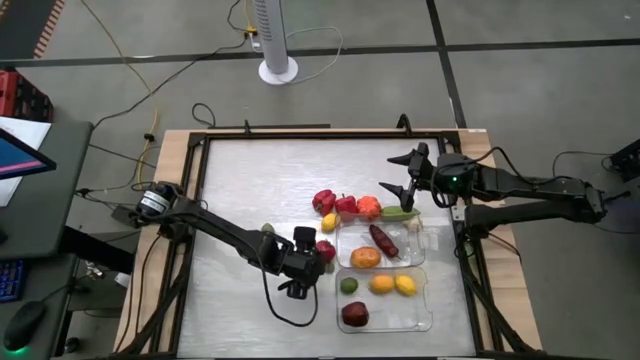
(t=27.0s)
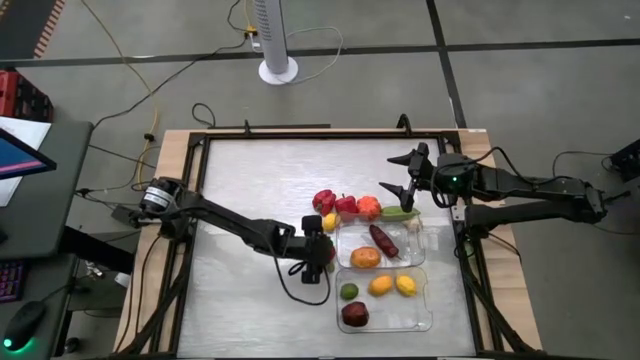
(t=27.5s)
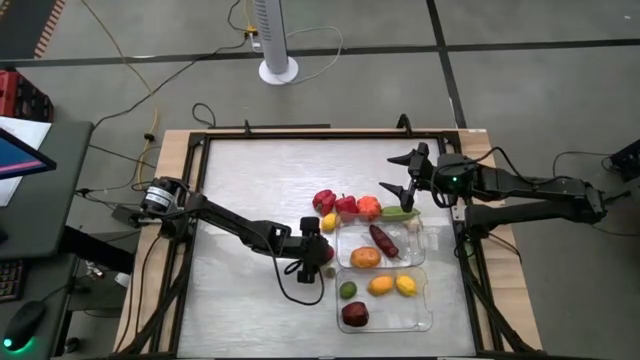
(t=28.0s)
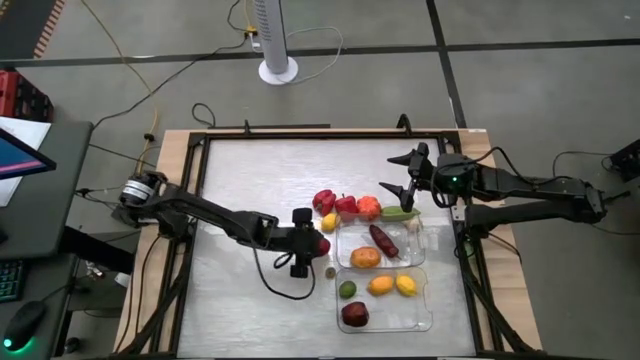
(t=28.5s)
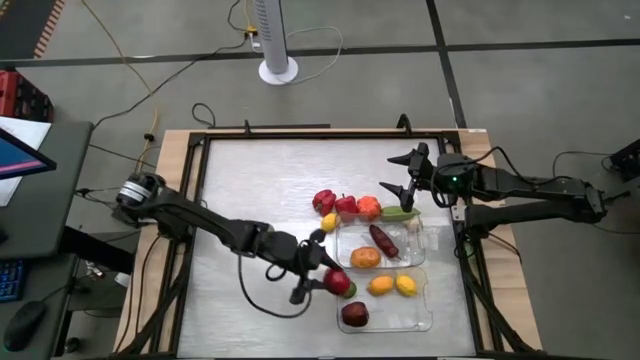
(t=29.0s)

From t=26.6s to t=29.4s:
Task: Sort produce into baskets
Put the tomato into the bottom transparent bin

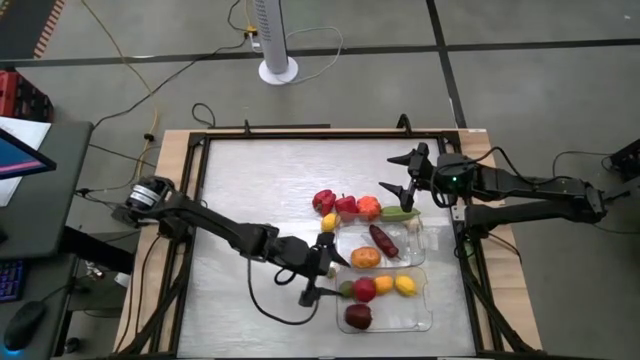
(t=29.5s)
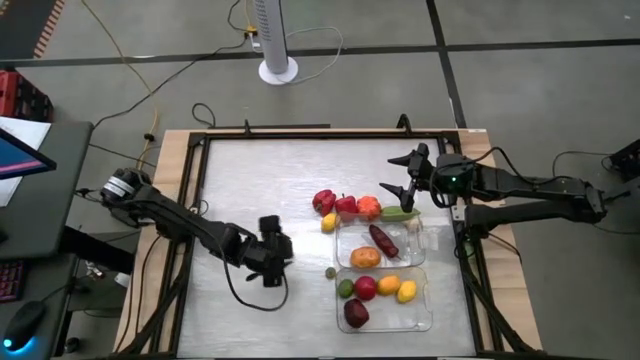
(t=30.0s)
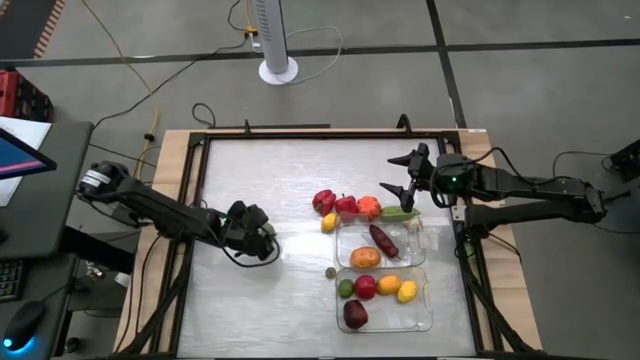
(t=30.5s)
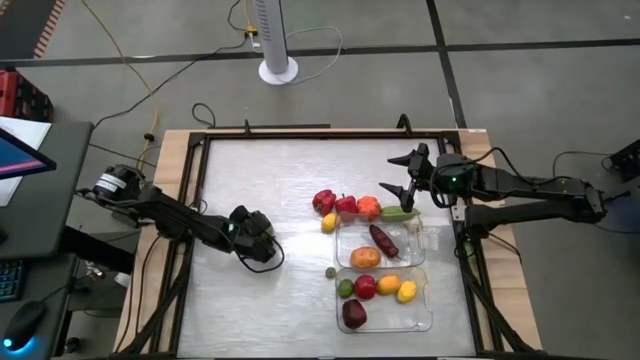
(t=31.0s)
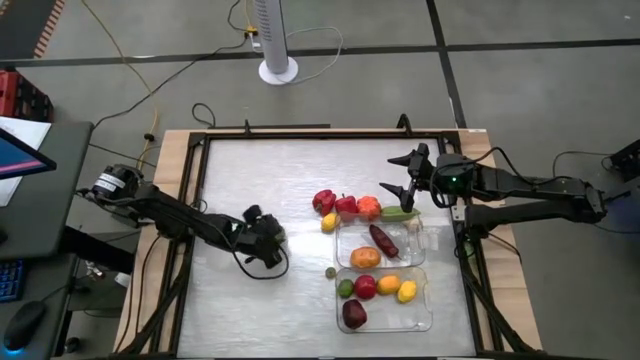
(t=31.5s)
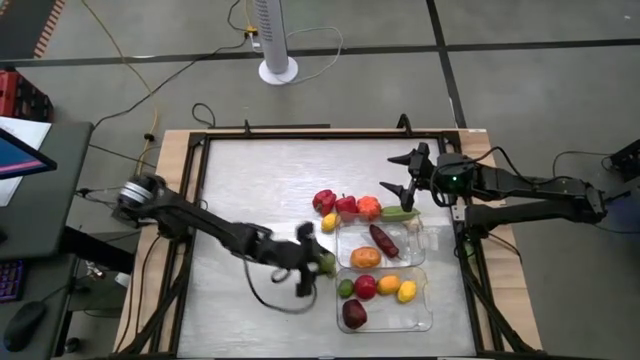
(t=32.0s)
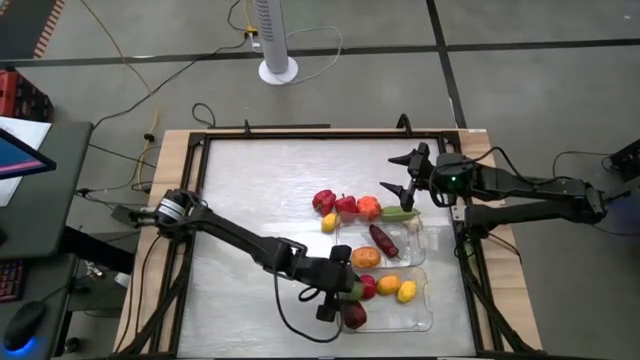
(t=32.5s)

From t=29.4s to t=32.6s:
Put the lime into the bottom transparent bin

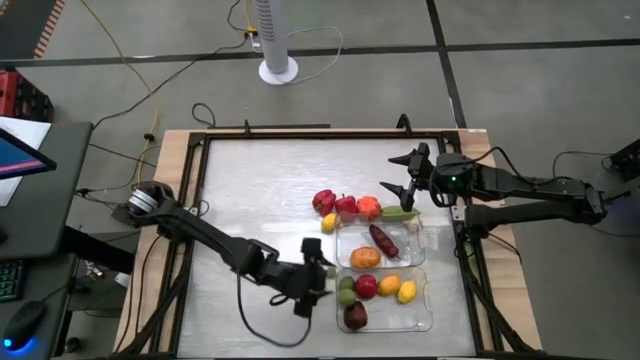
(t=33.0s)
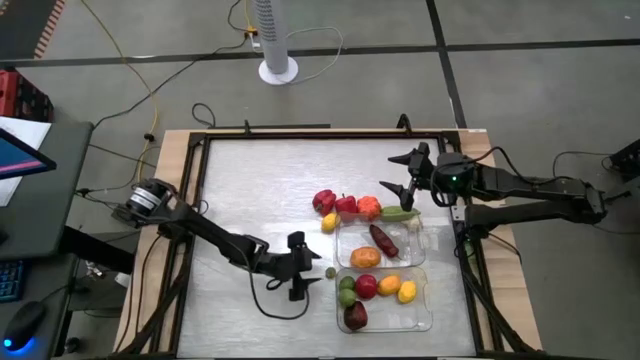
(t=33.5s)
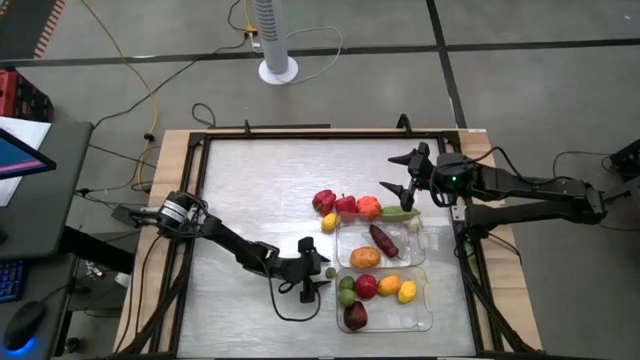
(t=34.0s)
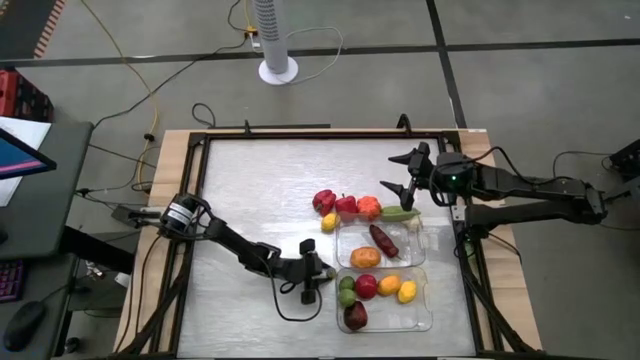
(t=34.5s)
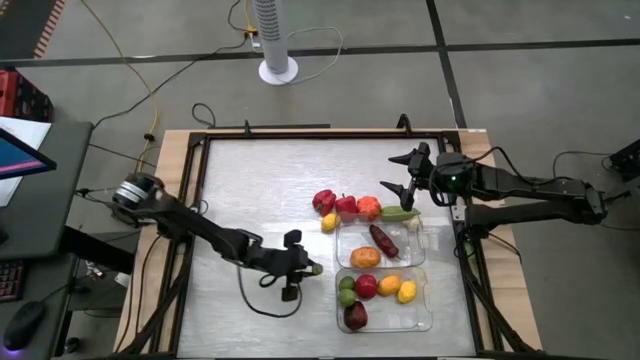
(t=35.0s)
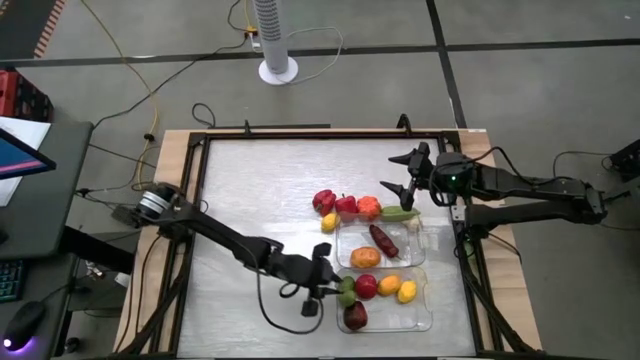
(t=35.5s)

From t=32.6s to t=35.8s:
Put the strawberry into the bottom transparent bin

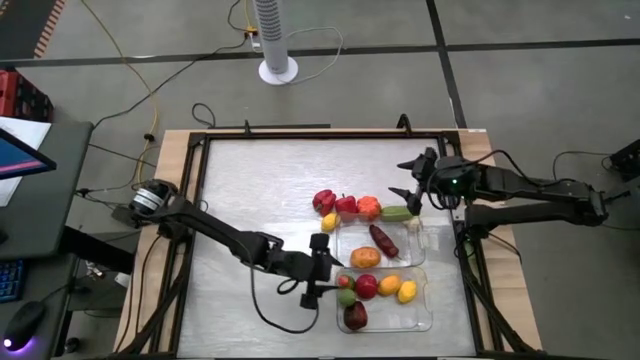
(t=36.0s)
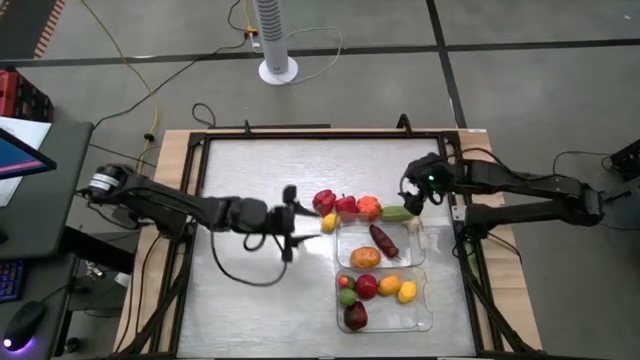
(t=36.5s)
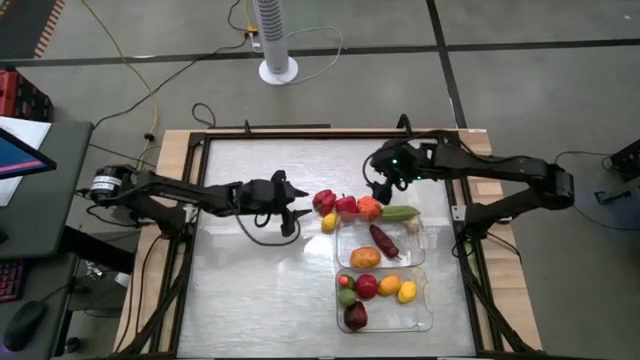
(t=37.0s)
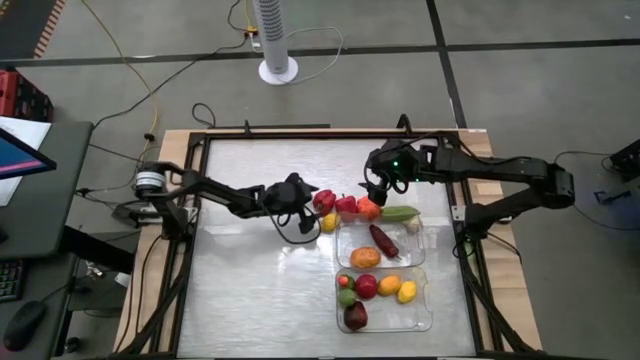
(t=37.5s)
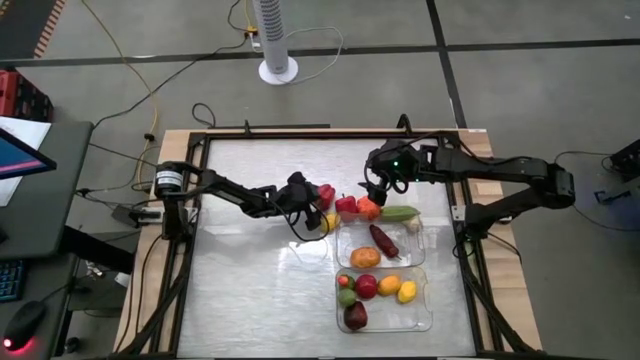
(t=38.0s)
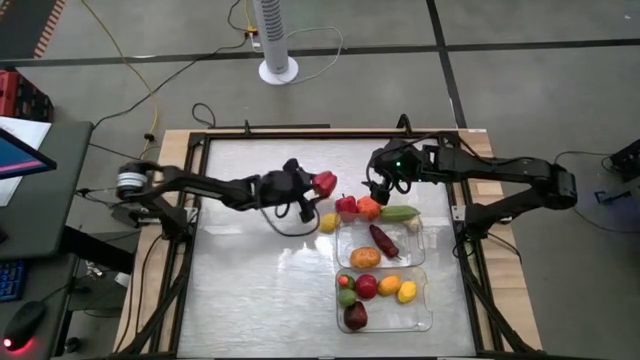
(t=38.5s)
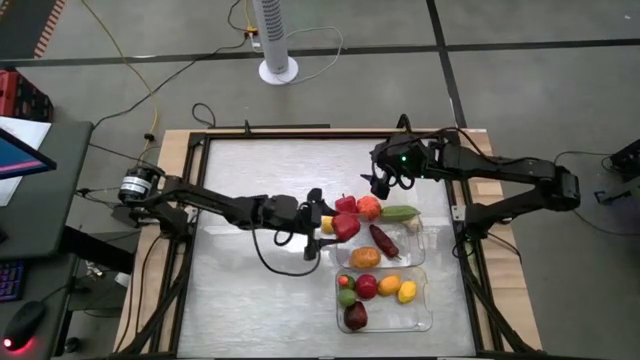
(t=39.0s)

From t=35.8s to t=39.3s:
Put the left bell pepper into the top transparent bin

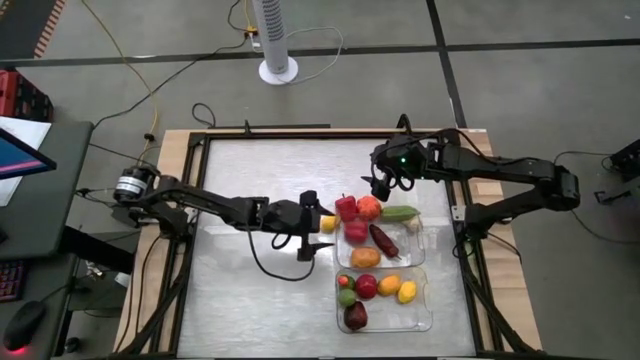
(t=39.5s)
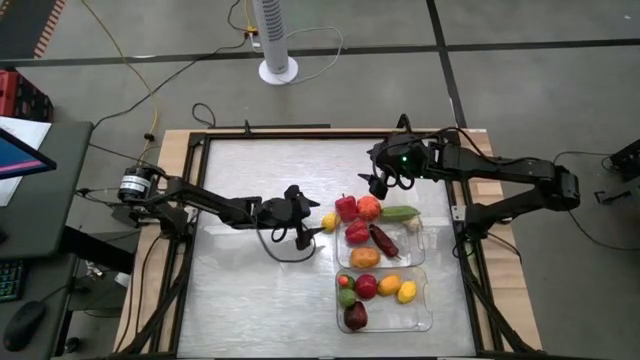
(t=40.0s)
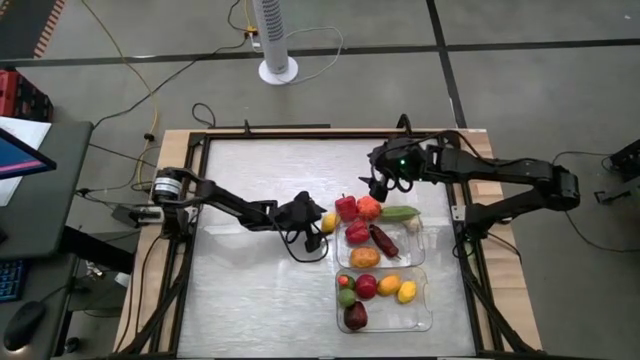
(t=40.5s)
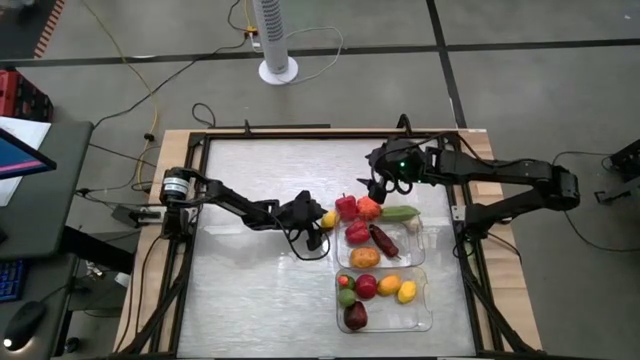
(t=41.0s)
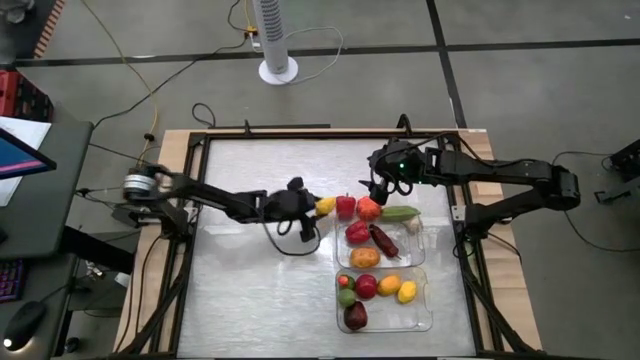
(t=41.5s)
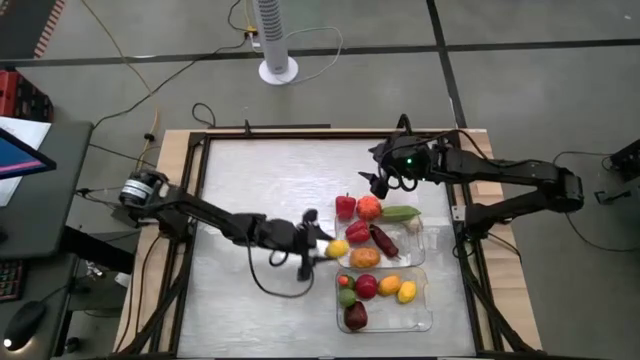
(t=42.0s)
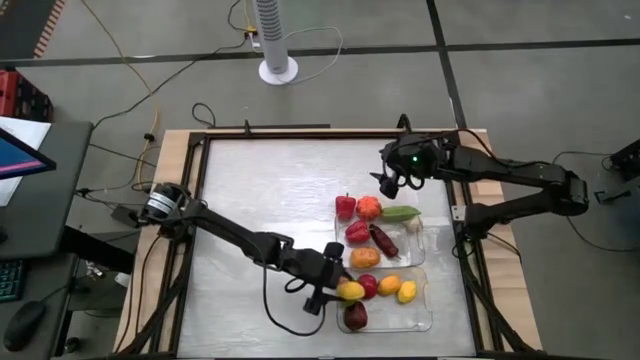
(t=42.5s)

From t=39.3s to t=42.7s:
Put the lemon into the bottom transparent bin

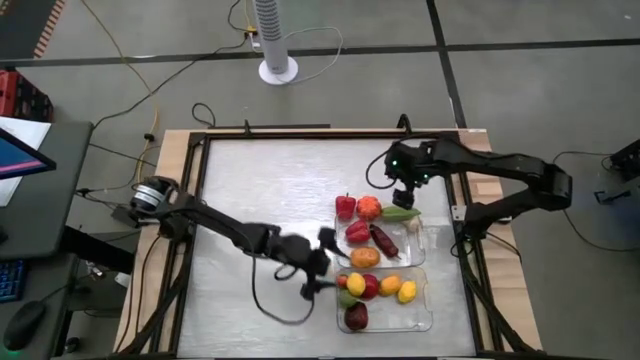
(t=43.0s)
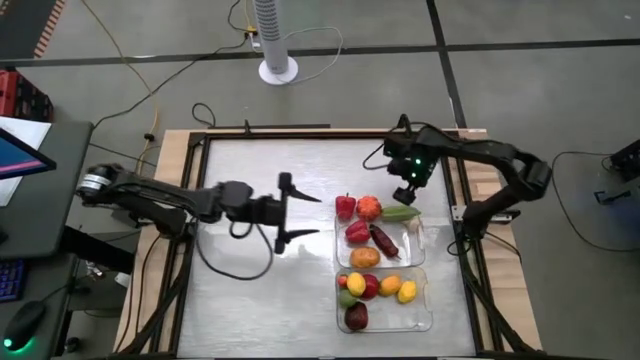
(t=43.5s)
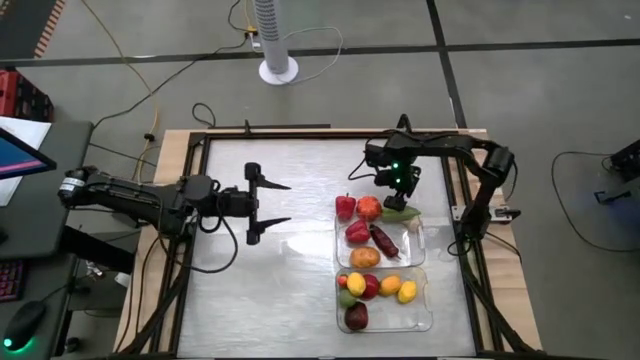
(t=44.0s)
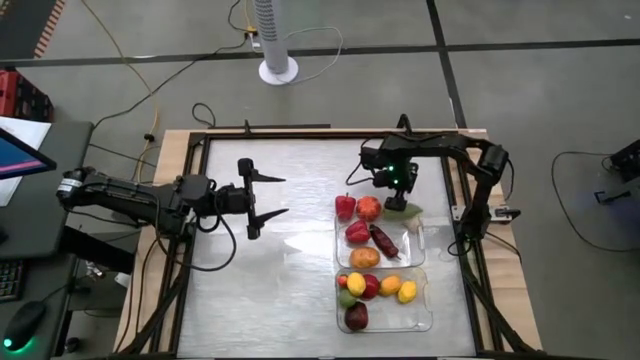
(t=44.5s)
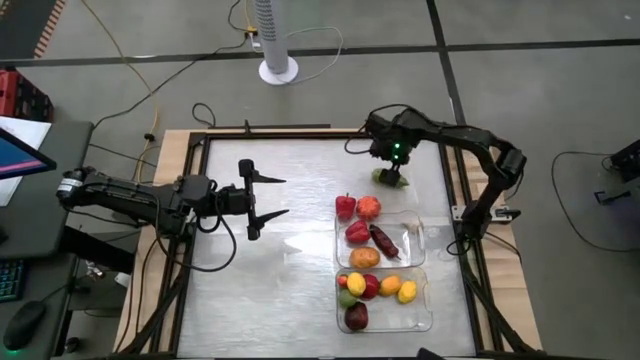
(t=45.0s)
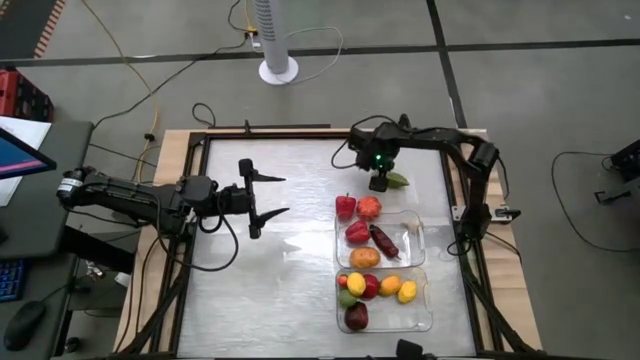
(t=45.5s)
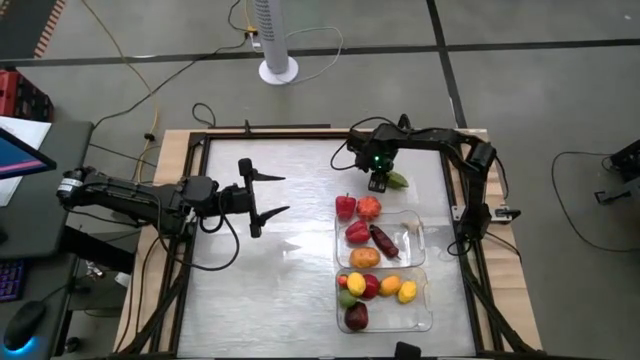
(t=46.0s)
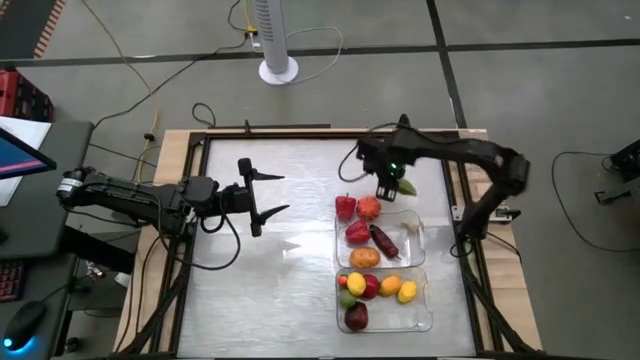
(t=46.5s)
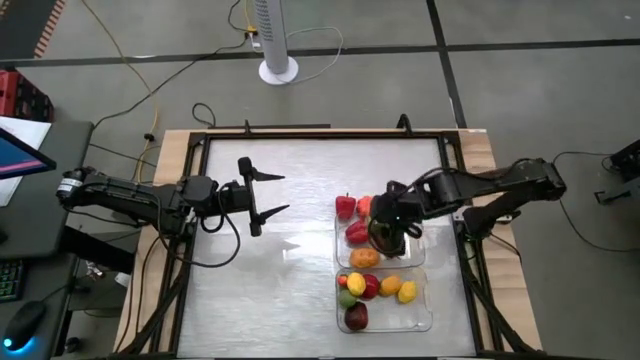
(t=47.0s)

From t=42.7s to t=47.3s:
Put the cucumber into the top transparent bin

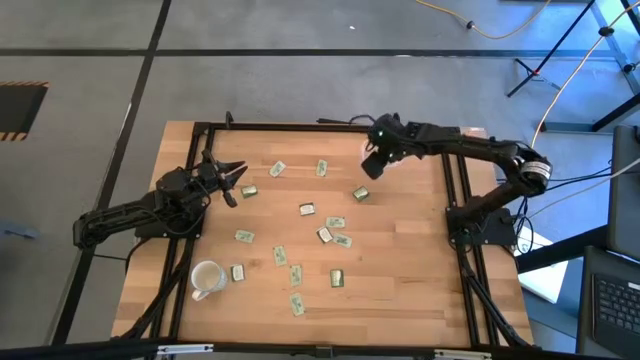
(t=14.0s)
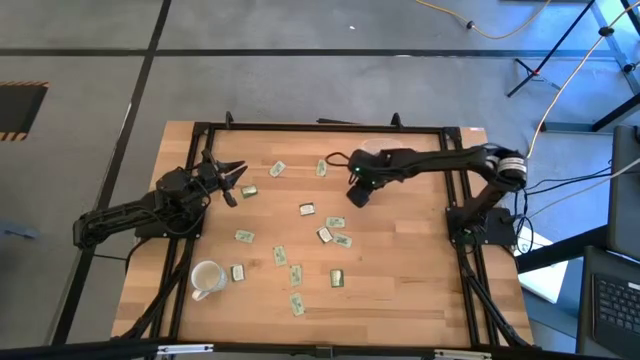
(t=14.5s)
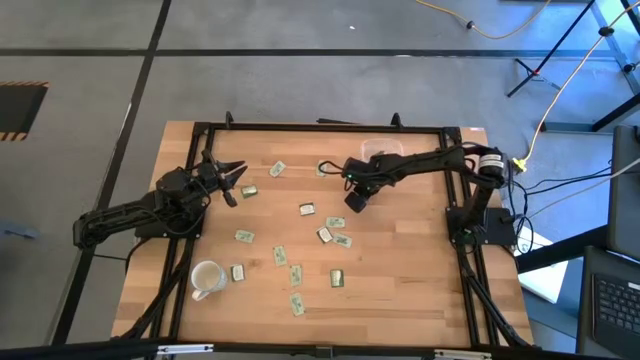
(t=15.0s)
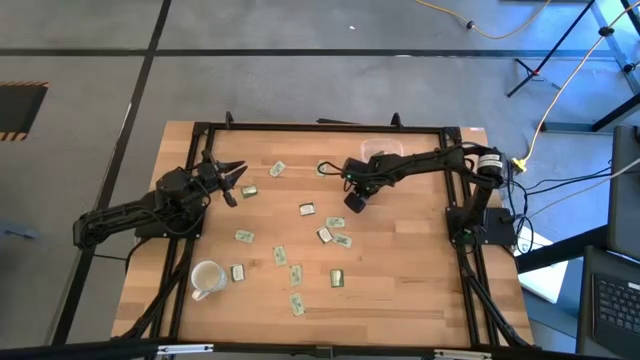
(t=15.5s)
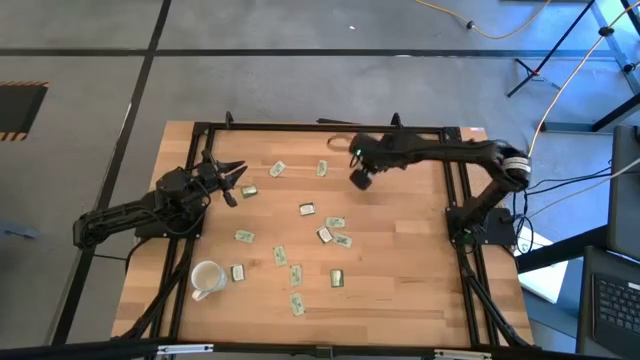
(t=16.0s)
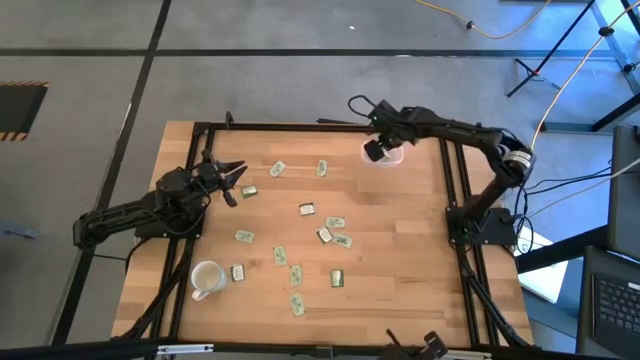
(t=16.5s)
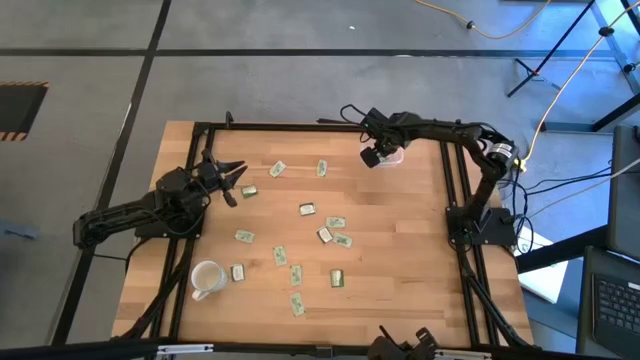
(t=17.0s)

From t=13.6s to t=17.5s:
Task: Pick and place Stevia / Truvia into bins
Put the dark green truvia packet into the transparent container
